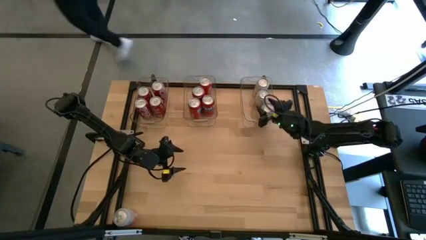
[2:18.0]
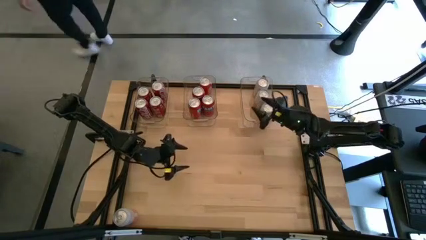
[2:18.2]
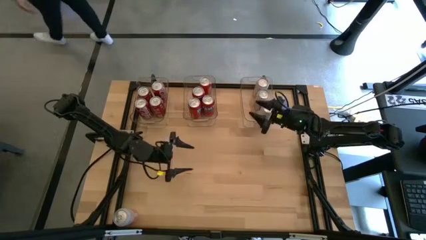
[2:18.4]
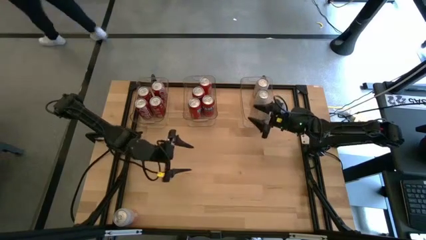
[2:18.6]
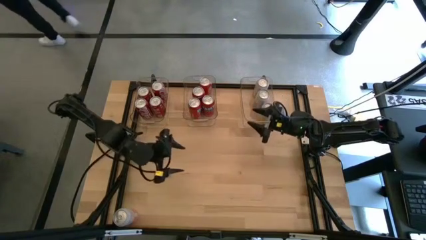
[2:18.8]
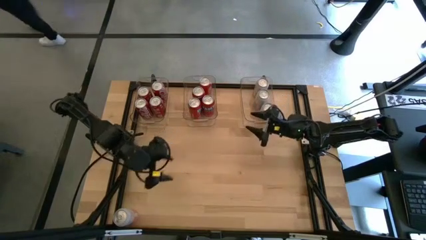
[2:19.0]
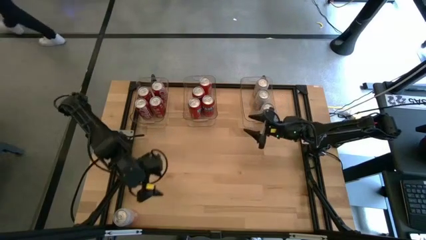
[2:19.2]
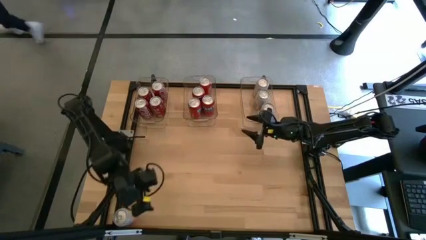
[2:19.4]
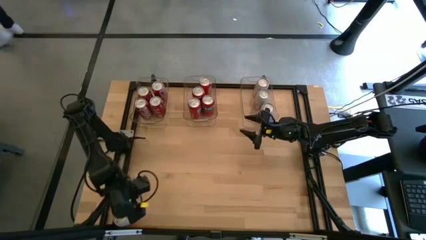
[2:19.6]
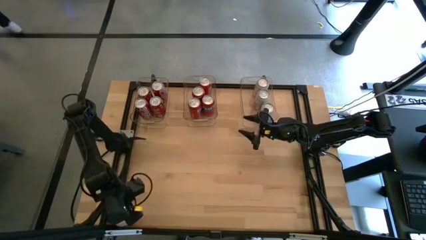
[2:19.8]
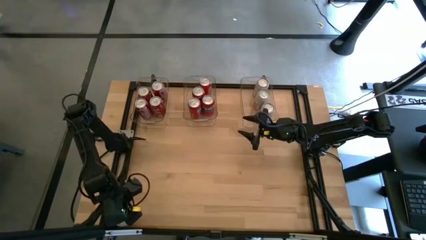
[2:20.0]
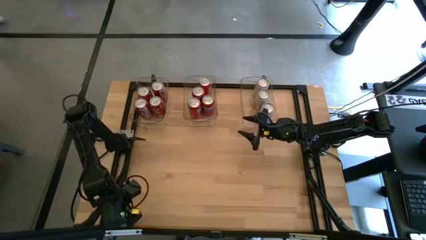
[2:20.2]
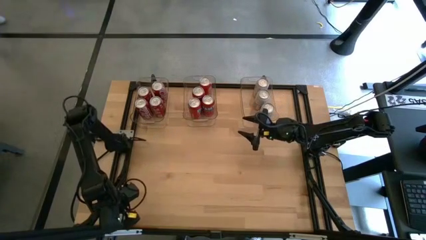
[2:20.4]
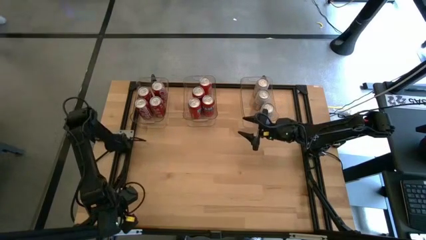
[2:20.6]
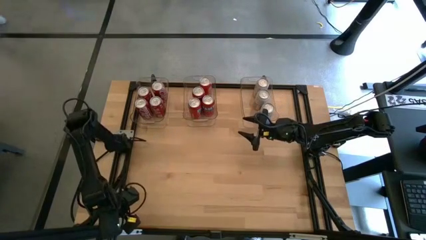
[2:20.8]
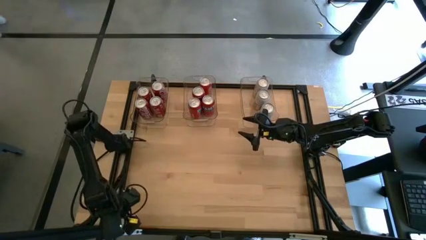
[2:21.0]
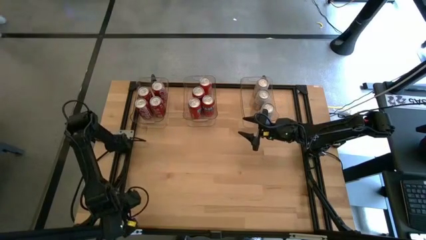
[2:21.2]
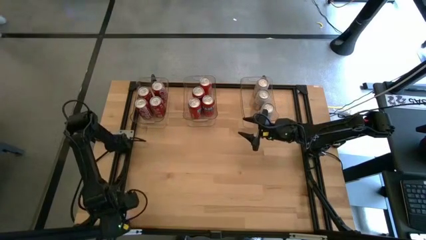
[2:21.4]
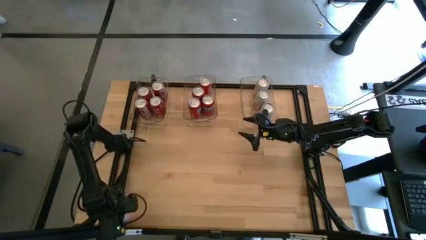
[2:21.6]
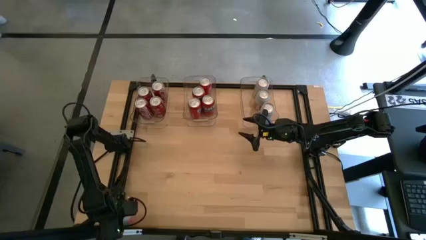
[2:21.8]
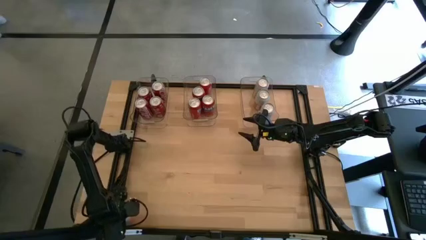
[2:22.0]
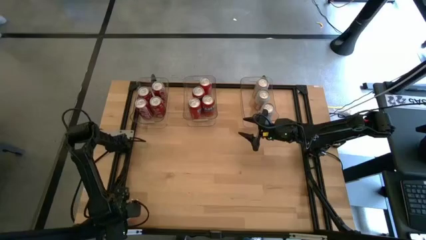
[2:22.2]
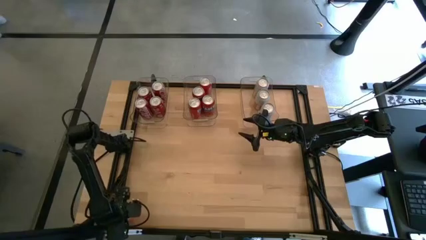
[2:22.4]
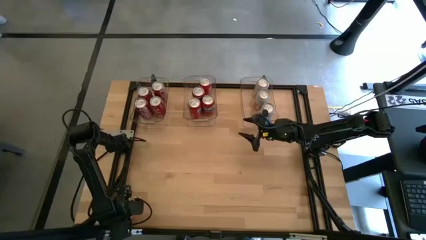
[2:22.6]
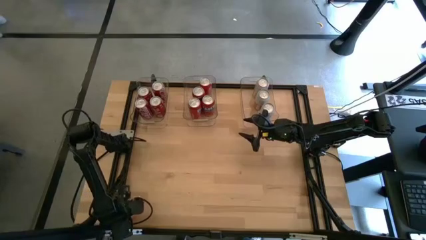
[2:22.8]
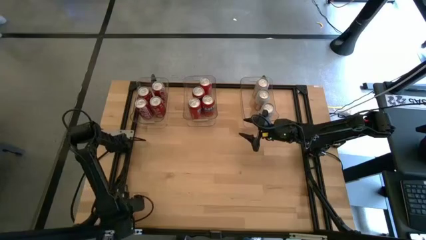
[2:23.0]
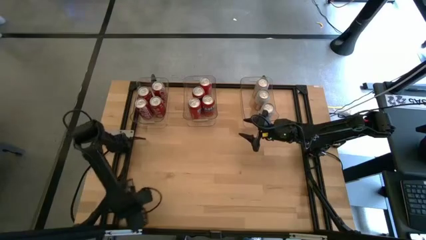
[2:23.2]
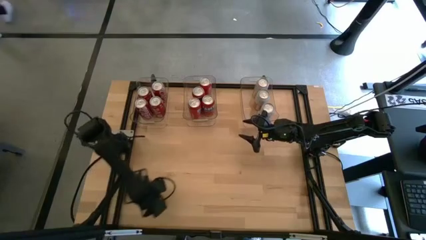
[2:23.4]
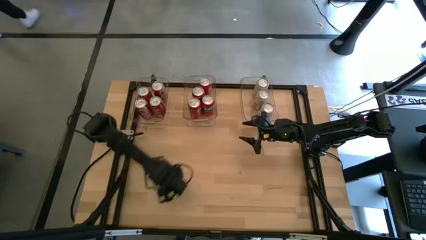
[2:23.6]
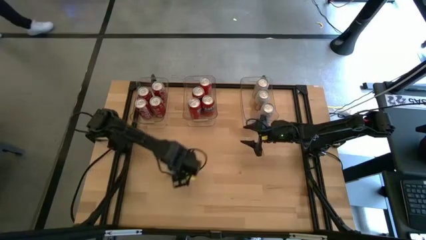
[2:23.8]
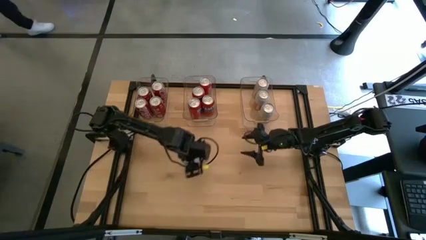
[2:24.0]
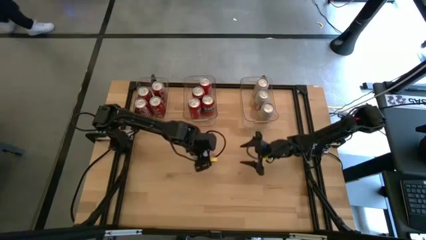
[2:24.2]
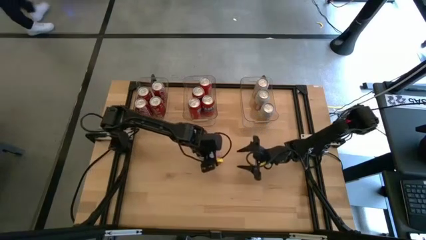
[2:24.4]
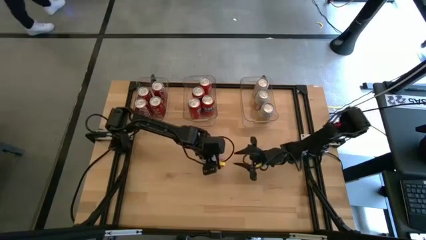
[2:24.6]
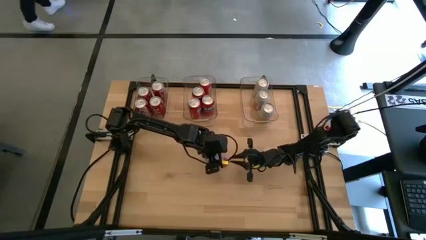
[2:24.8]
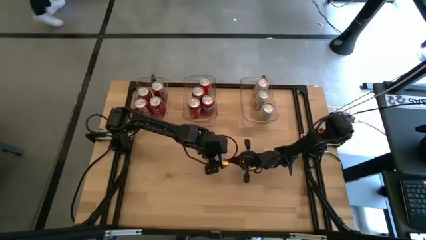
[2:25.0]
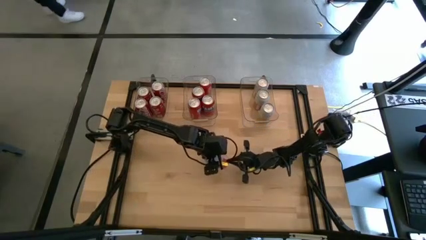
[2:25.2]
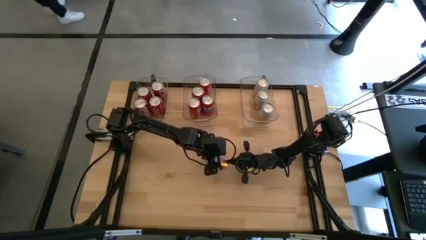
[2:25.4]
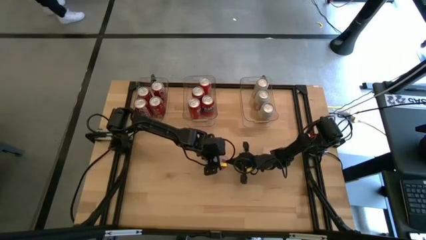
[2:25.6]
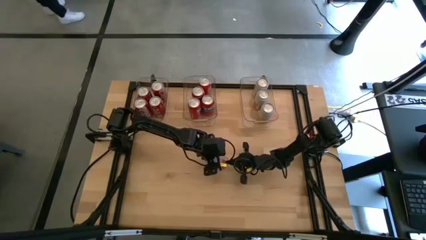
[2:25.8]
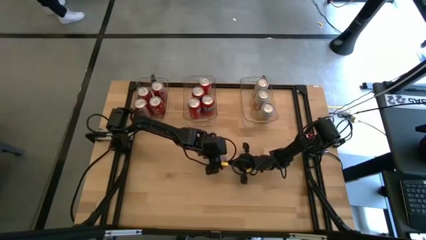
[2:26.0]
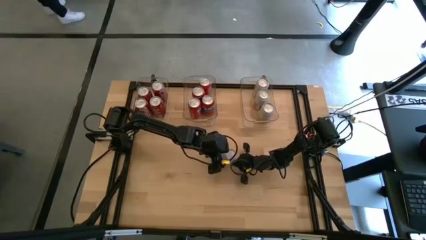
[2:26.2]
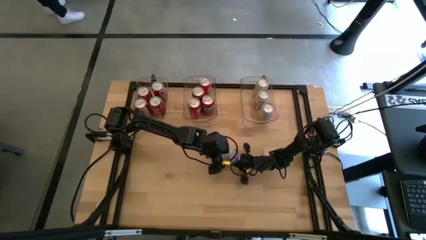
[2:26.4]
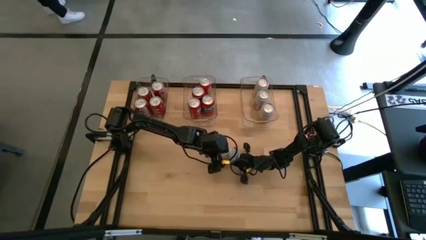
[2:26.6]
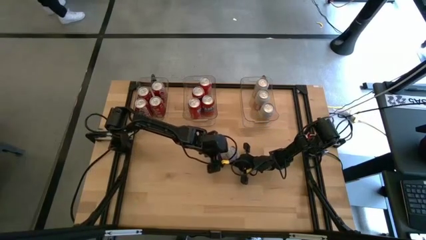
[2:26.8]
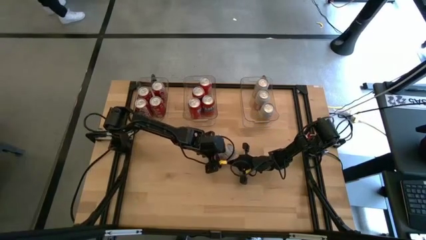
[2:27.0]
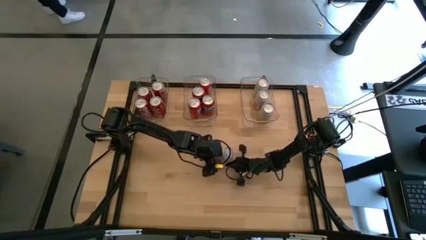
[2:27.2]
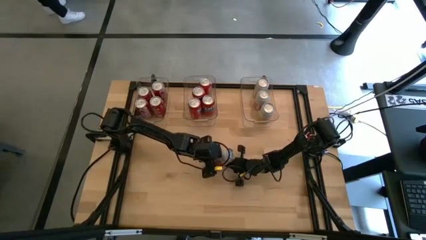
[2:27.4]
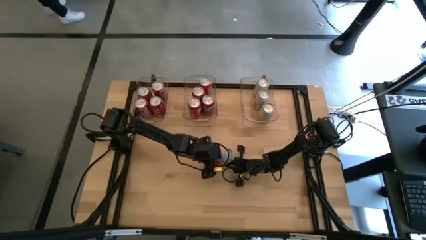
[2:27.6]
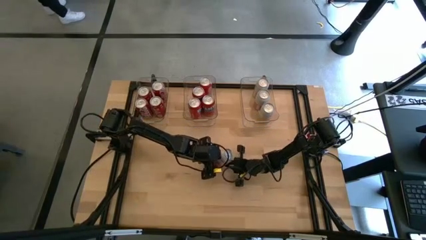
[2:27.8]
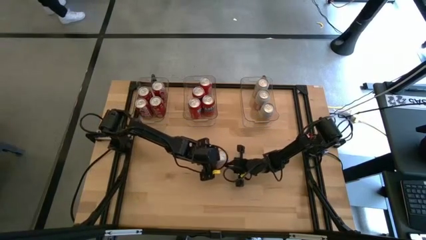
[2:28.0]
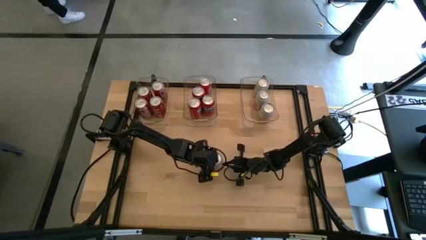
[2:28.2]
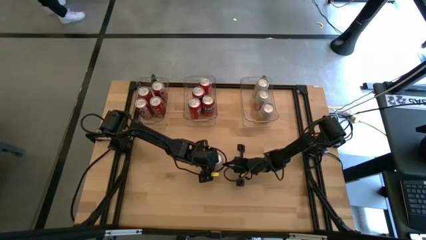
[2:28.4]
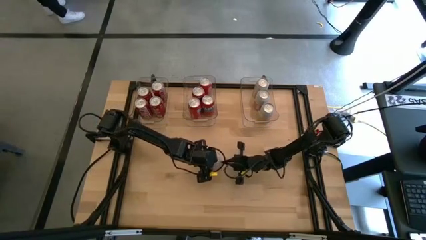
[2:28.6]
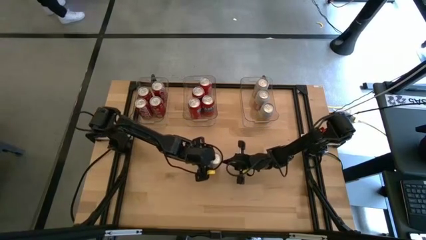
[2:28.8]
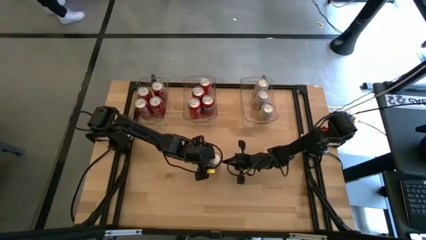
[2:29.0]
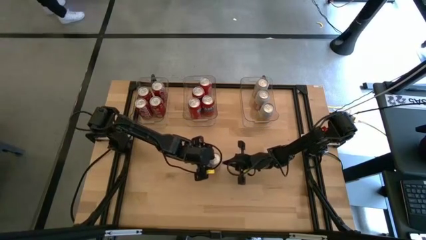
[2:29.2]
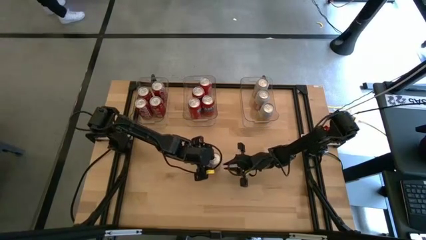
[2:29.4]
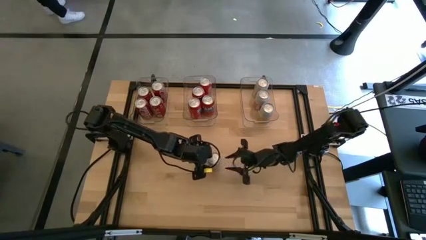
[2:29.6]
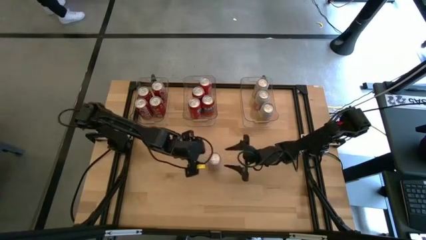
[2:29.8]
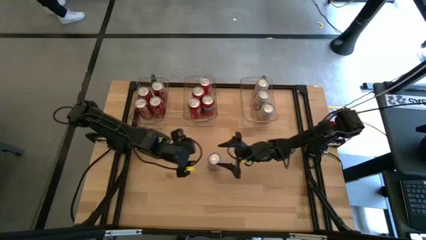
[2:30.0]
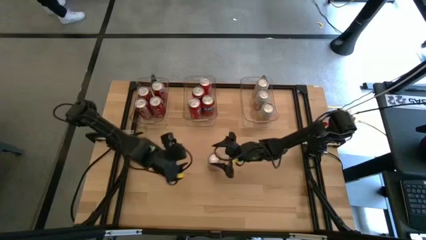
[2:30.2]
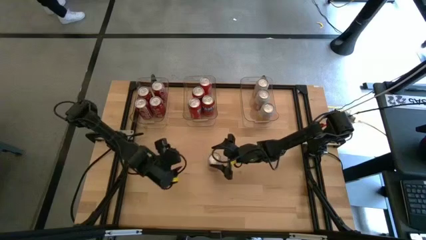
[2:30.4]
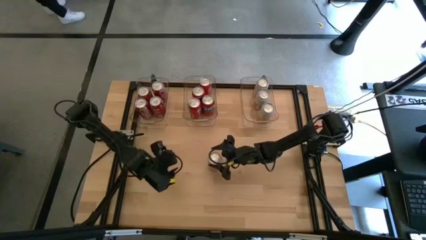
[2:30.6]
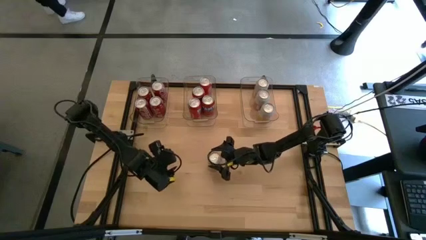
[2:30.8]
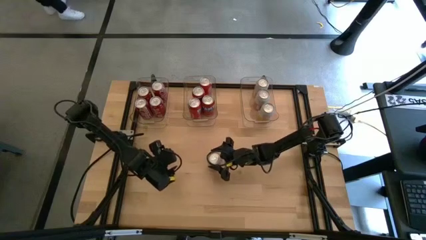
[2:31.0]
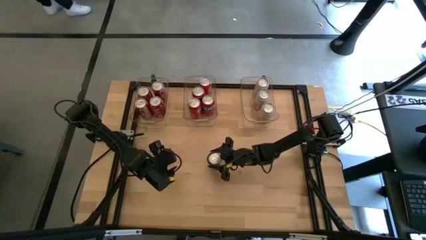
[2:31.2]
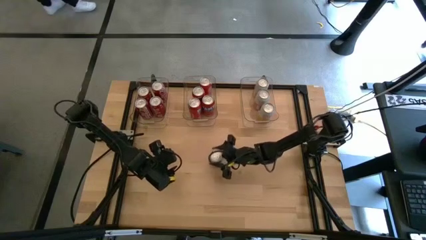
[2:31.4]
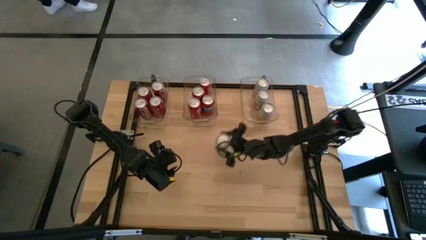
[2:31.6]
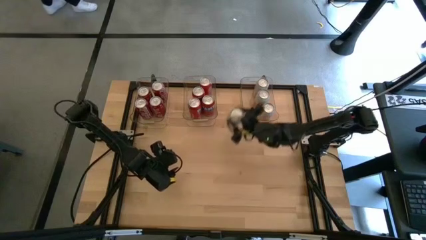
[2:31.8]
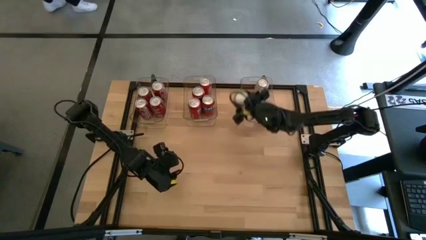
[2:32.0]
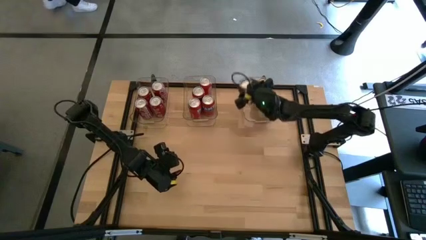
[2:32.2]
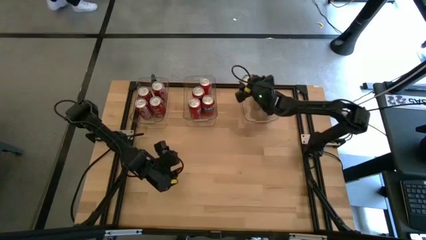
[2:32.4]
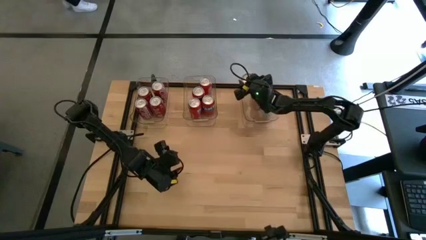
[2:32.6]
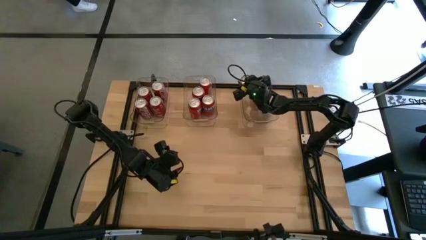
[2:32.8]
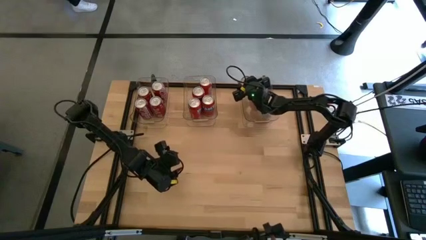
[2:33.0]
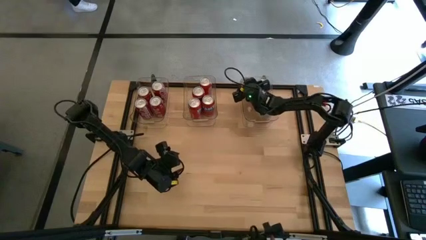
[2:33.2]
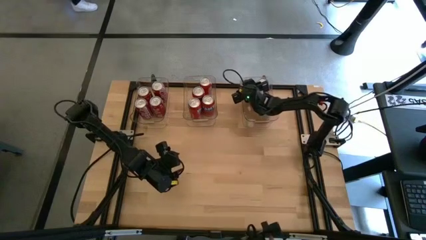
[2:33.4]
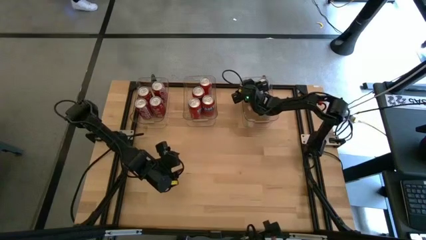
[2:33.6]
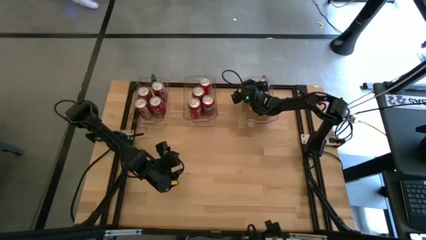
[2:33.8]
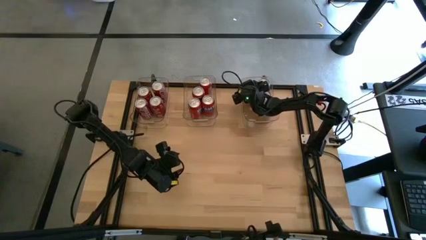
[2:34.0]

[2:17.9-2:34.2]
Task: Sort soda cans
Put the white soda can into the right transparent bin
